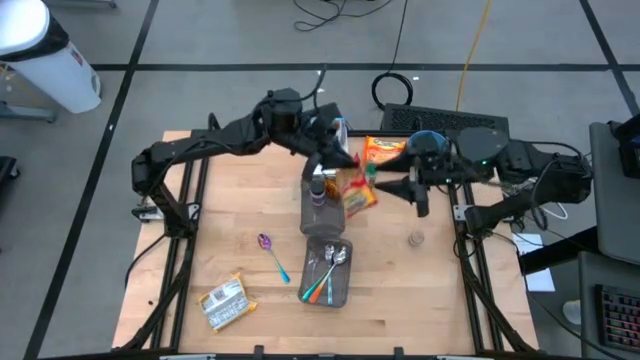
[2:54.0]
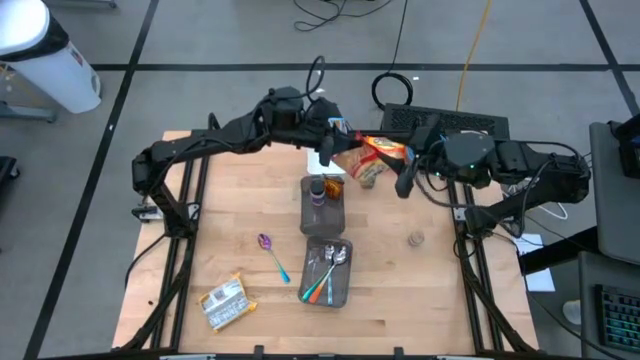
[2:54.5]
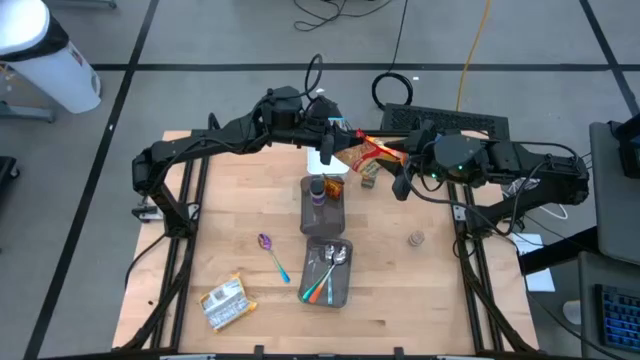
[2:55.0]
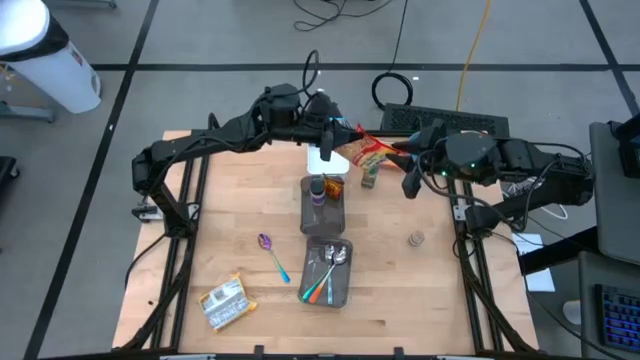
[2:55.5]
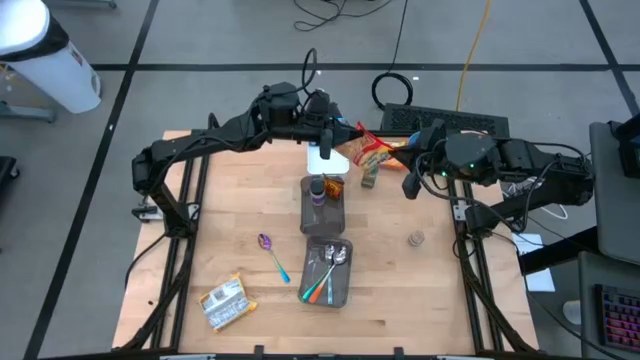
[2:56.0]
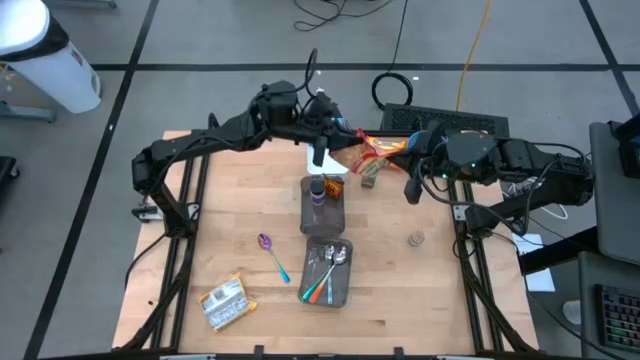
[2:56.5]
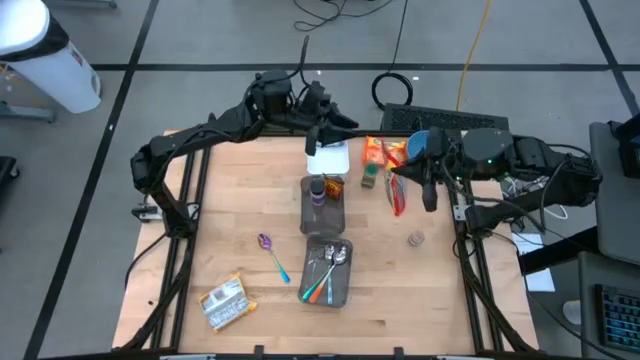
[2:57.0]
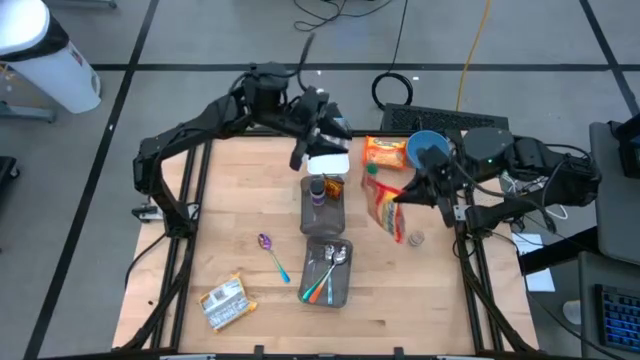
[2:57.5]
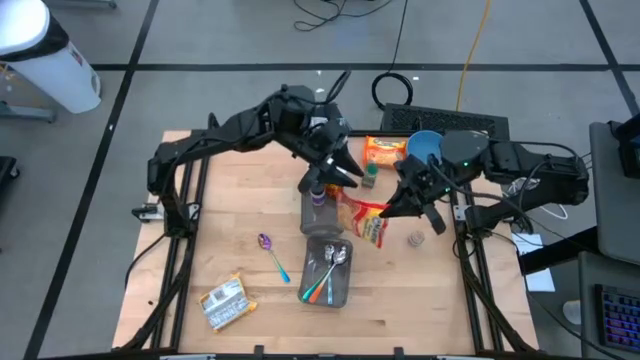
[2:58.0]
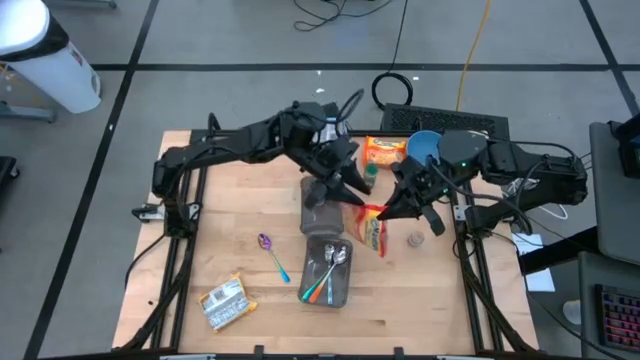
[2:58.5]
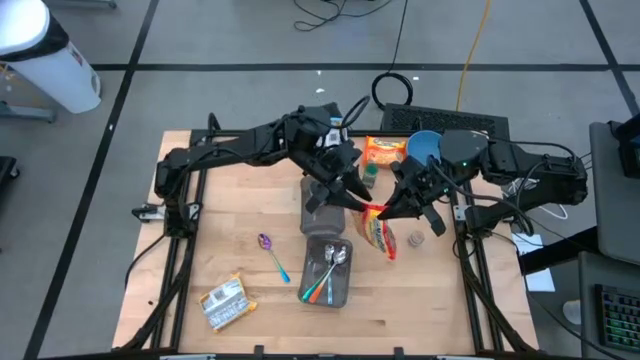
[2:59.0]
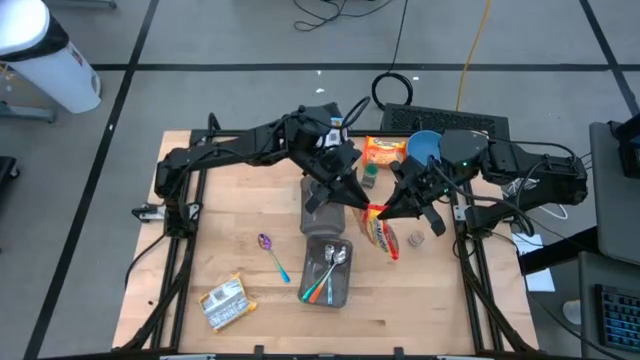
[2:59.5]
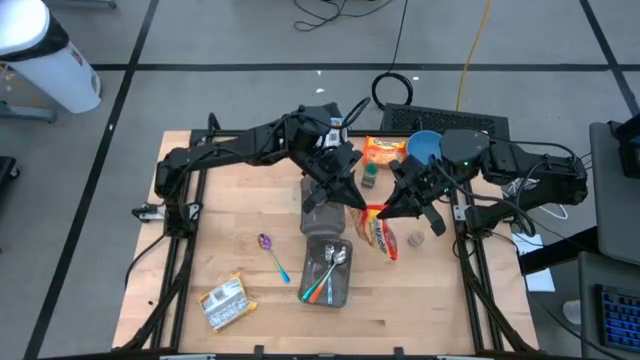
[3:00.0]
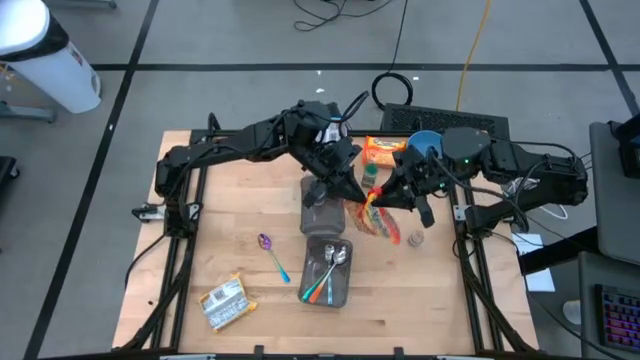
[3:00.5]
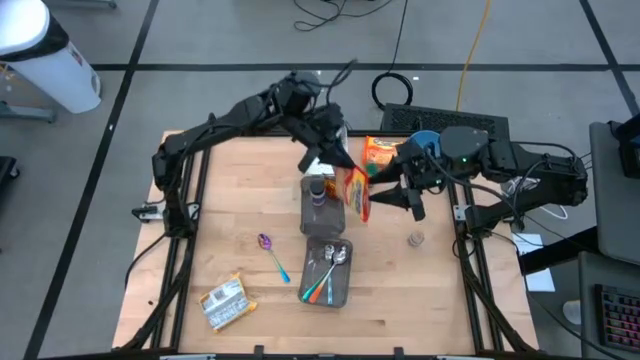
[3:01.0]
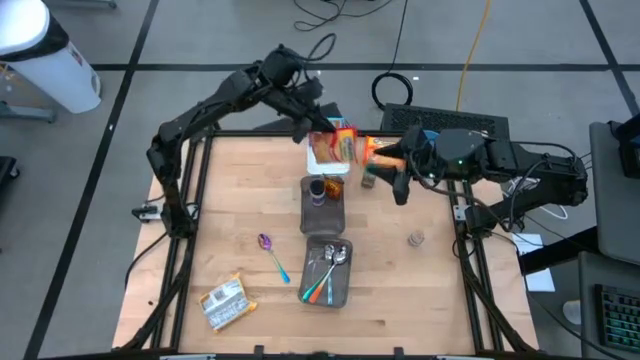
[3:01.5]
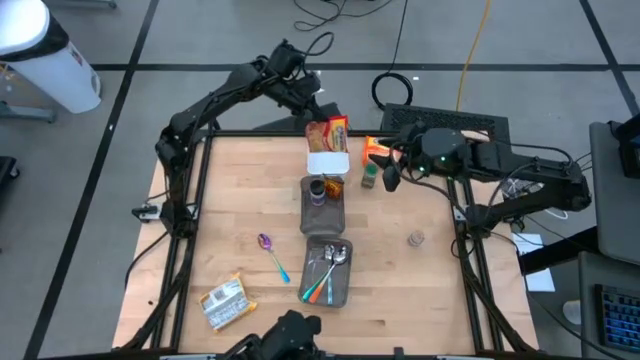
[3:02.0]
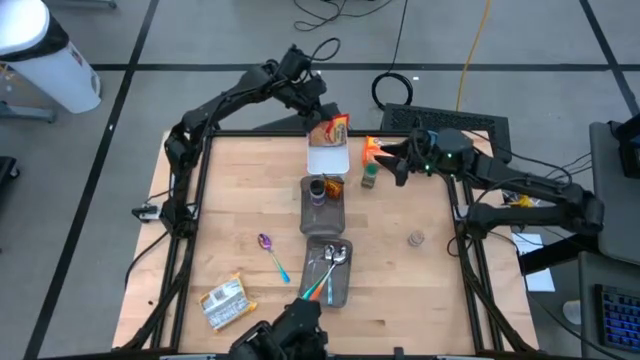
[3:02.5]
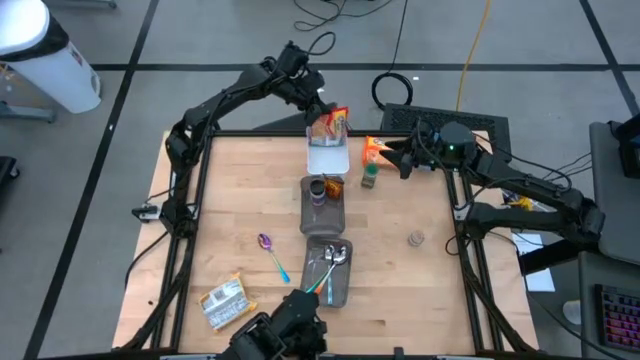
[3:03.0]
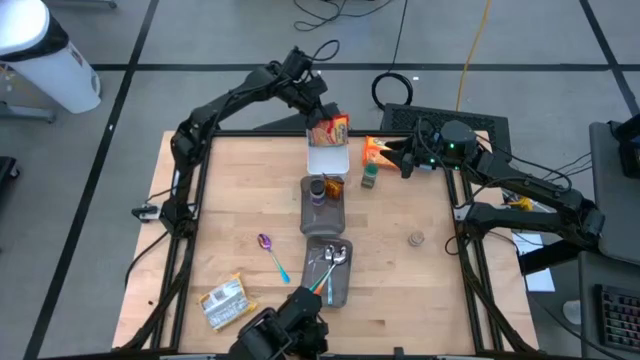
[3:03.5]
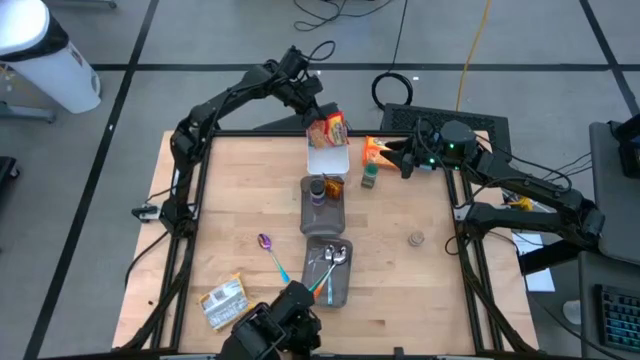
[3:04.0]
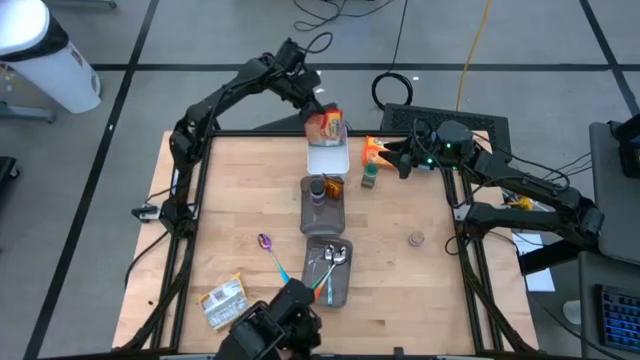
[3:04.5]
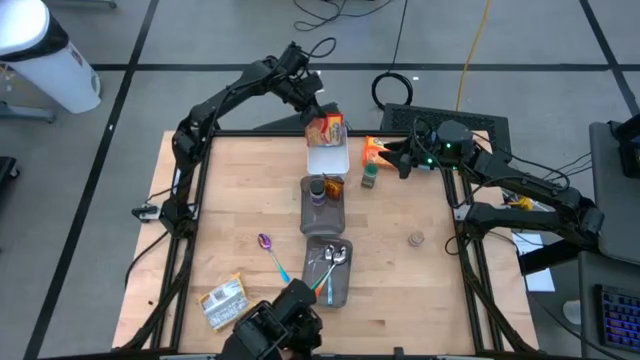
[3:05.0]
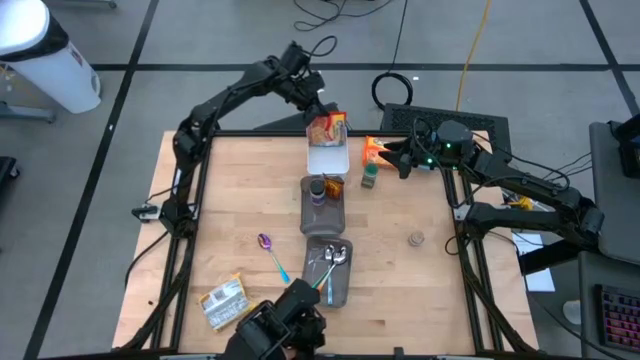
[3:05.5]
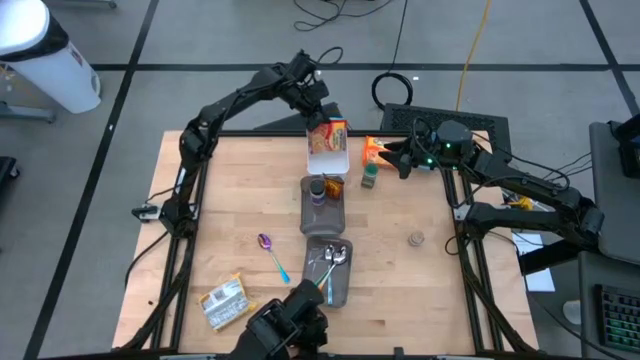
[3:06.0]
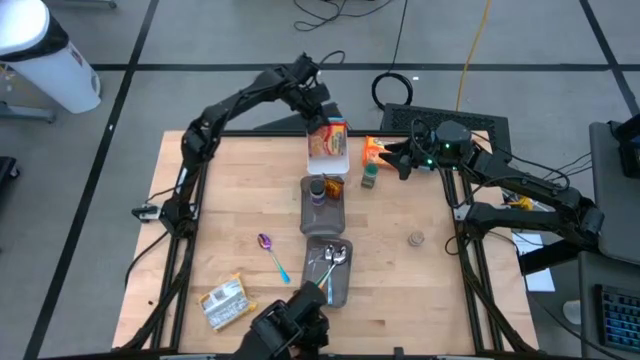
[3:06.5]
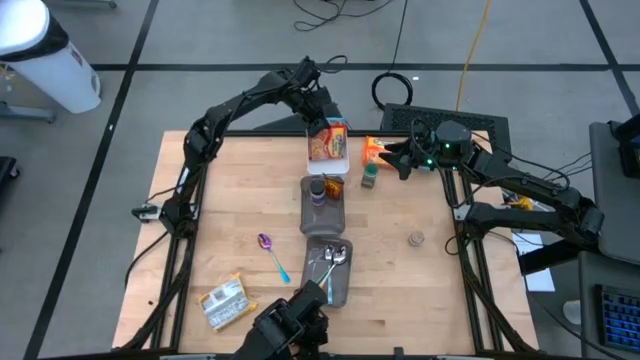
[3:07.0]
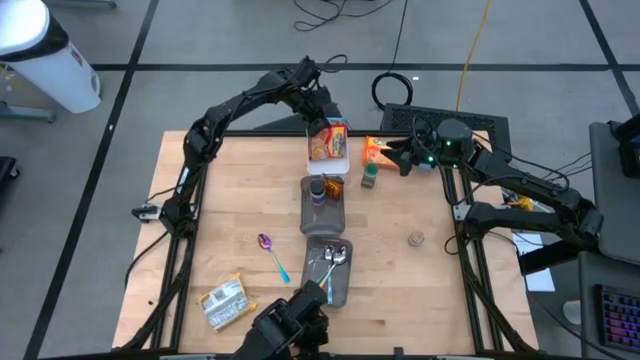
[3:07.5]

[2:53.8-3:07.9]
Task: Pick & Place Food Item
Put the red noodle pack into the white bin

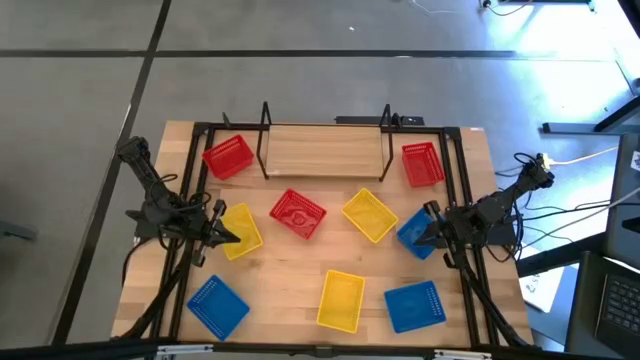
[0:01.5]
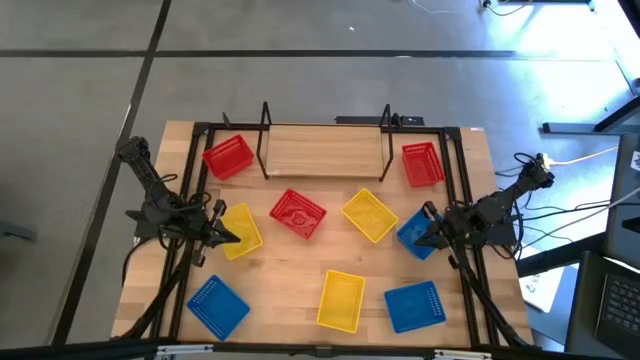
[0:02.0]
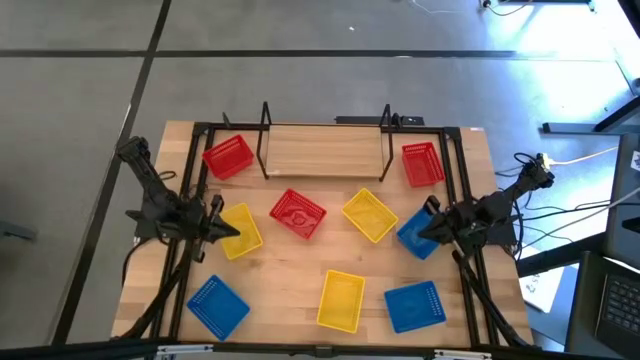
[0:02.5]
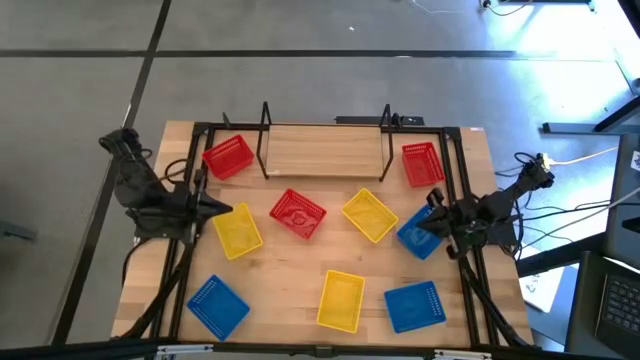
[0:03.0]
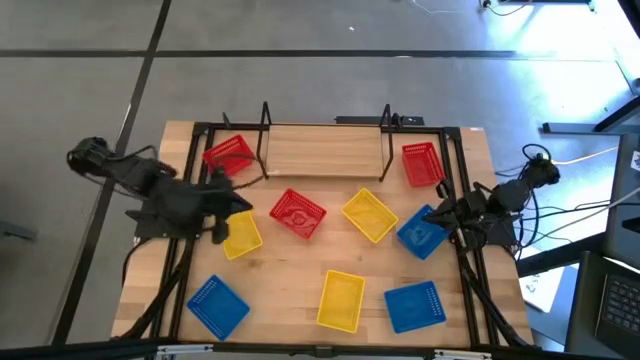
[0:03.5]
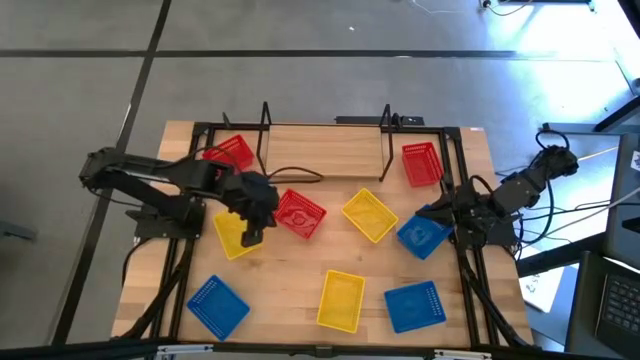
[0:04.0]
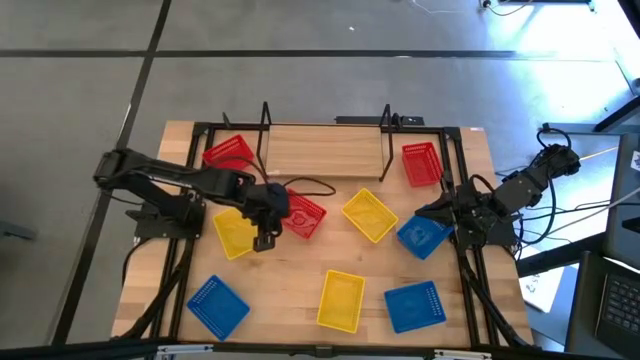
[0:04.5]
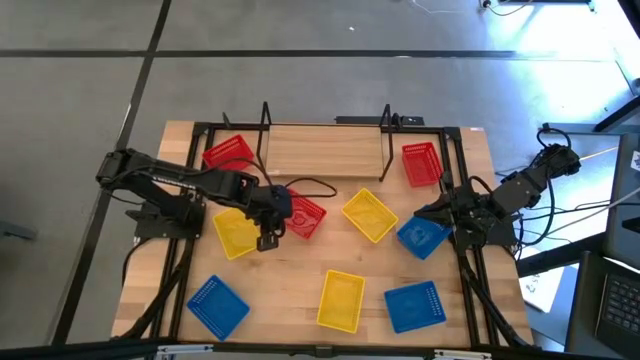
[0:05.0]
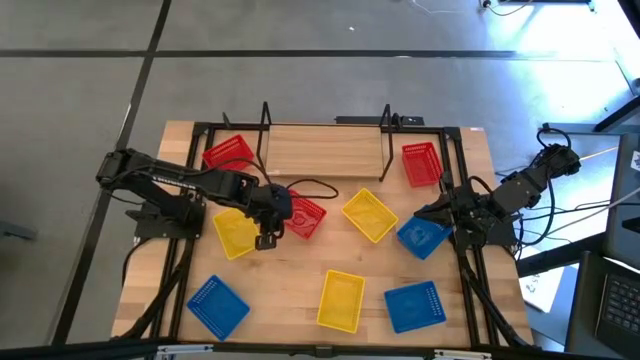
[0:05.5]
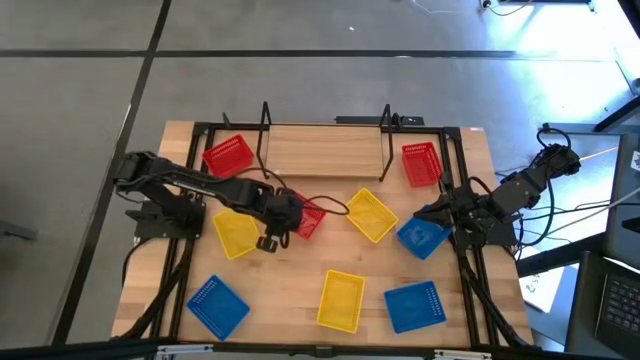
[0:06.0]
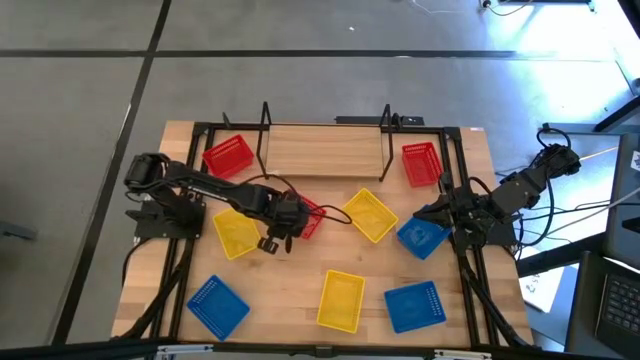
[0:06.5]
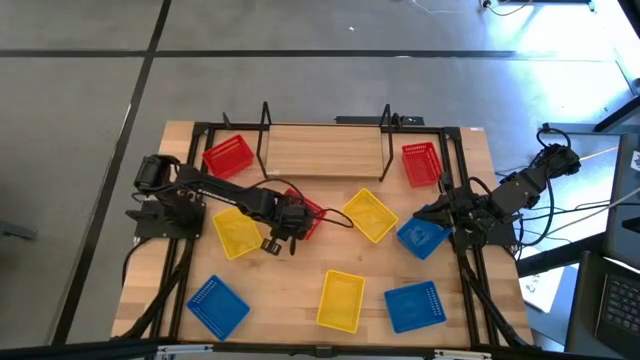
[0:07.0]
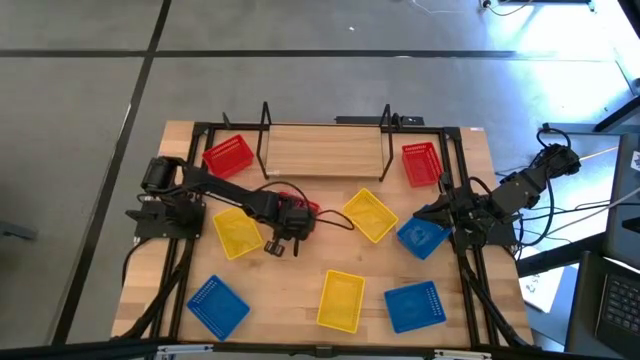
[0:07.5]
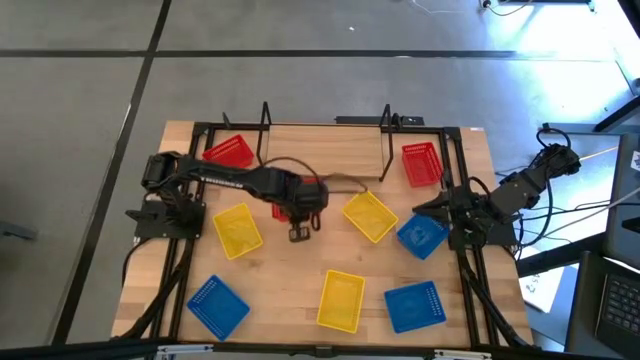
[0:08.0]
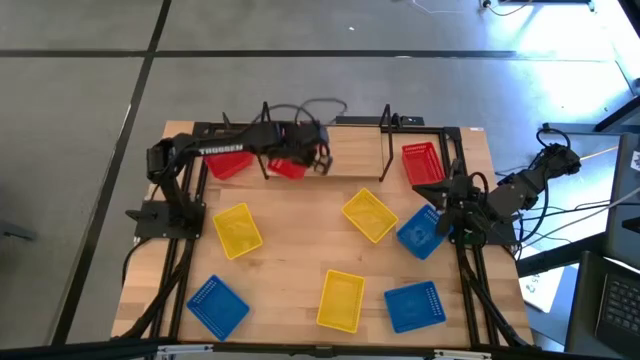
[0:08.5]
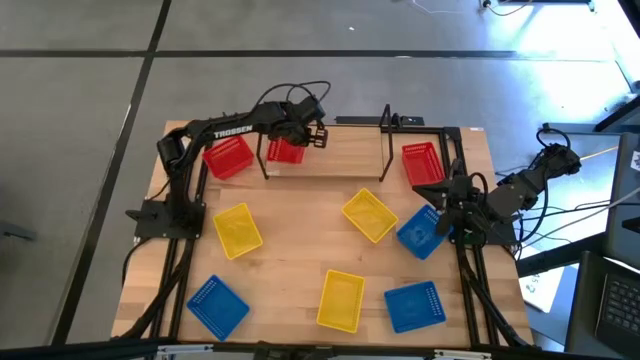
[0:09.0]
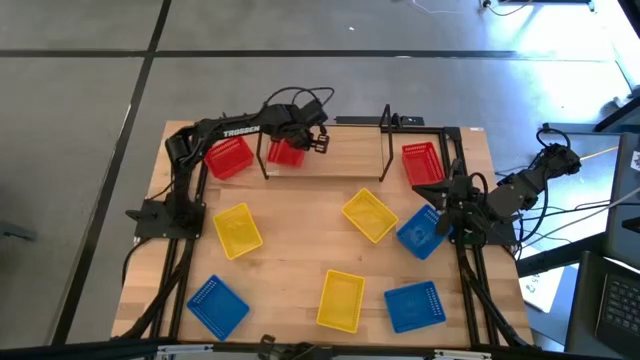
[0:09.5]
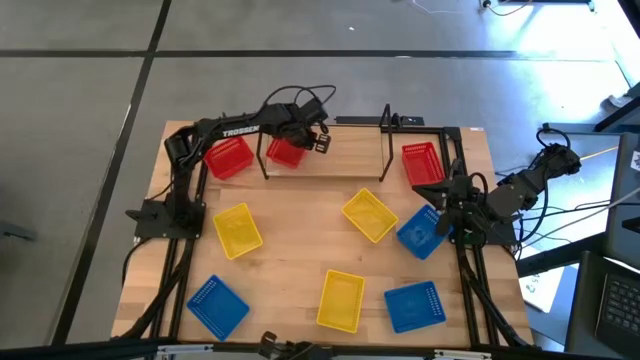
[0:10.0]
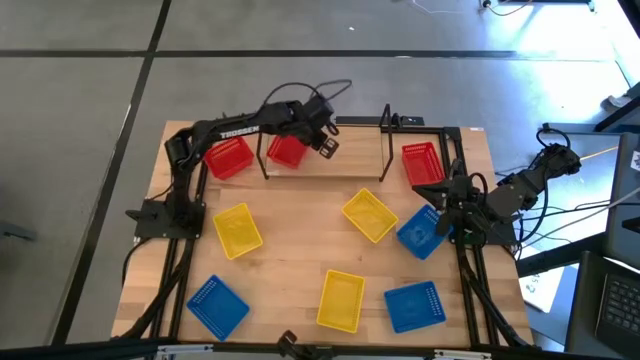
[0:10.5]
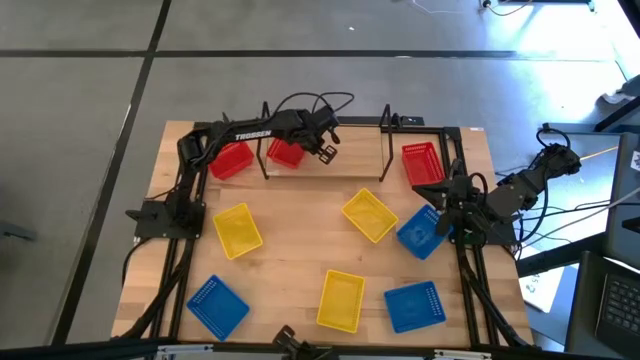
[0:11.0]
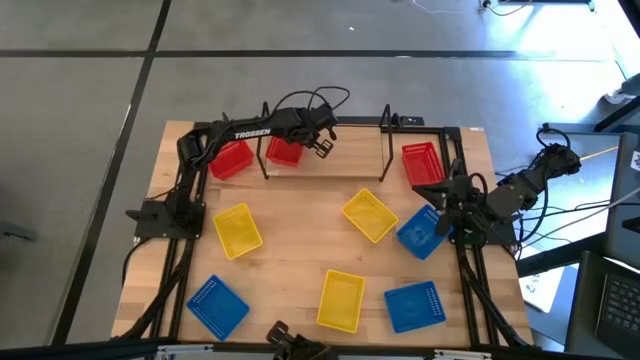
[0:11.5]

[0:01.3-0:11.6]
Task: Stack baskets on shelf by color
Put the bottom red bin on the shelf
